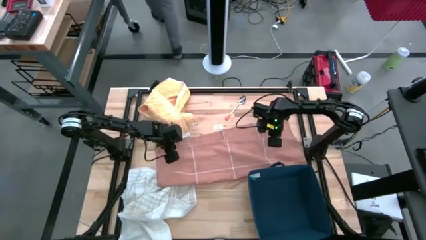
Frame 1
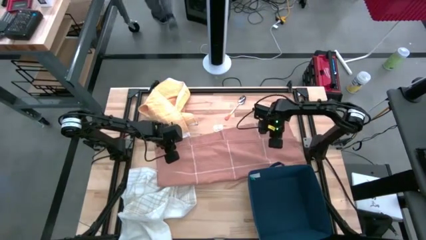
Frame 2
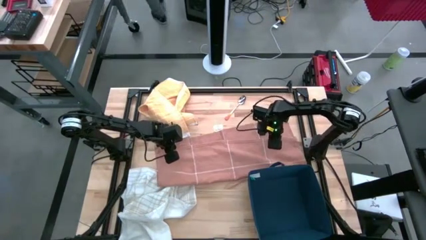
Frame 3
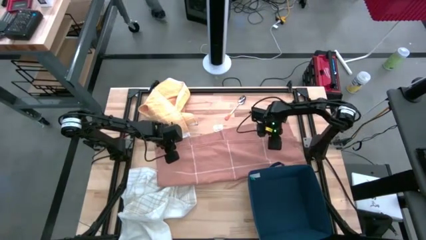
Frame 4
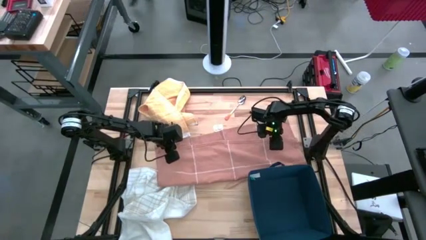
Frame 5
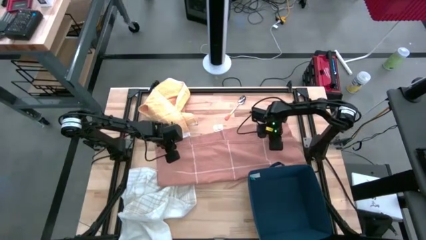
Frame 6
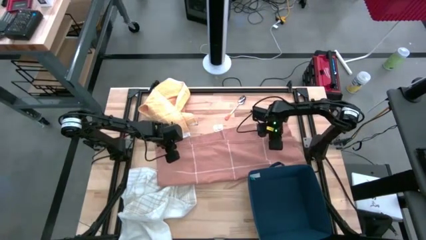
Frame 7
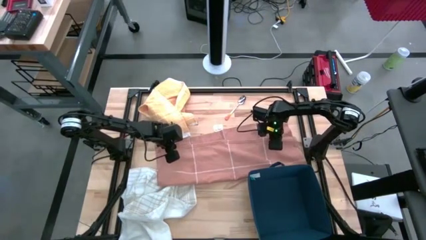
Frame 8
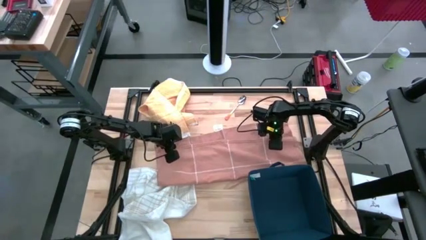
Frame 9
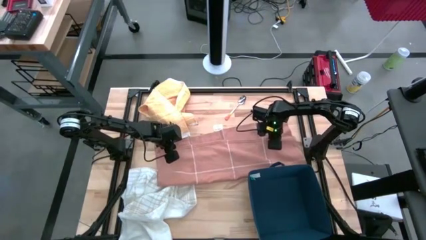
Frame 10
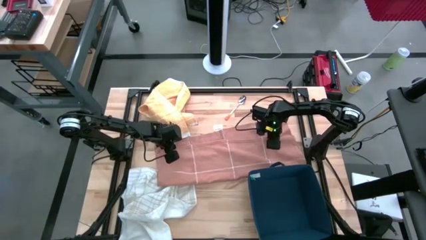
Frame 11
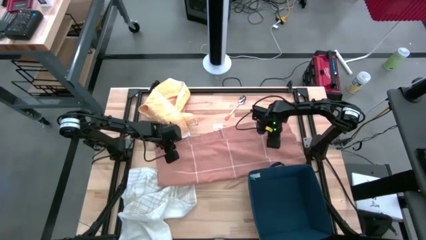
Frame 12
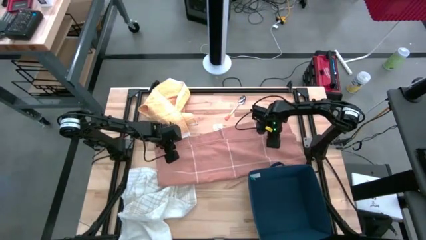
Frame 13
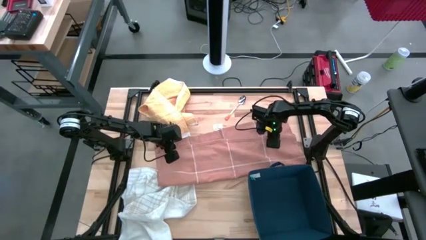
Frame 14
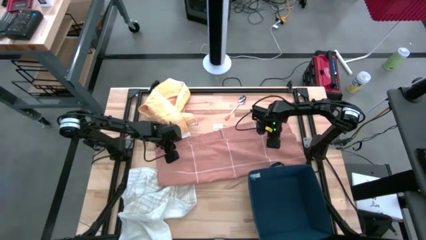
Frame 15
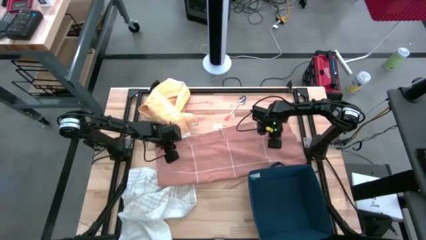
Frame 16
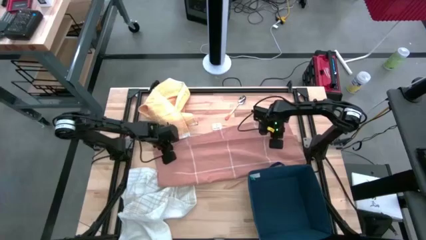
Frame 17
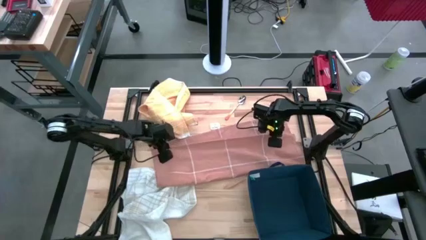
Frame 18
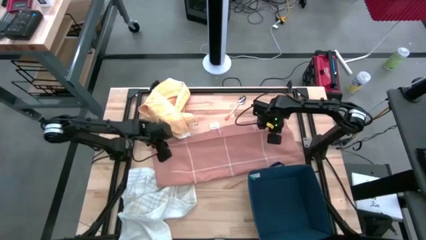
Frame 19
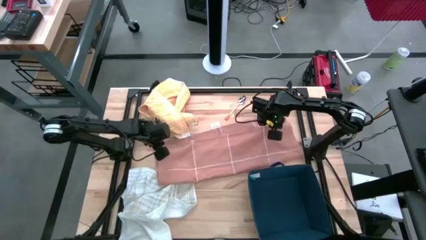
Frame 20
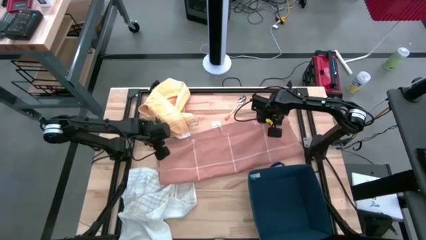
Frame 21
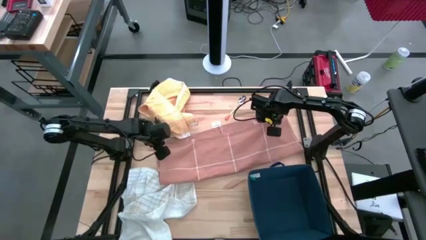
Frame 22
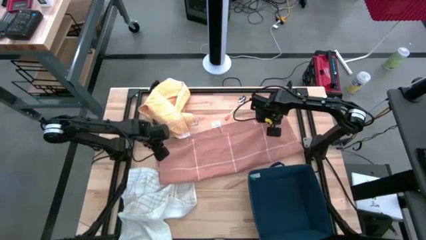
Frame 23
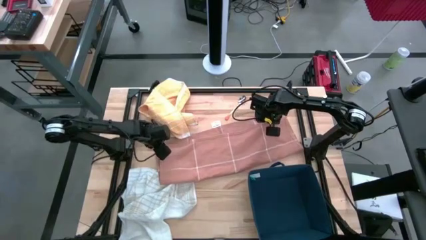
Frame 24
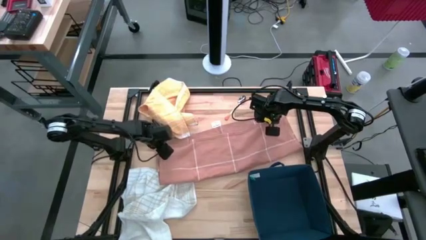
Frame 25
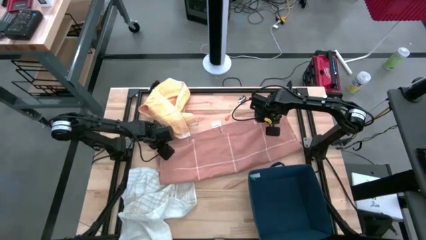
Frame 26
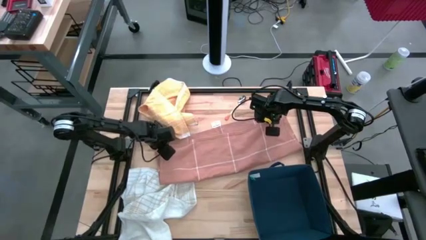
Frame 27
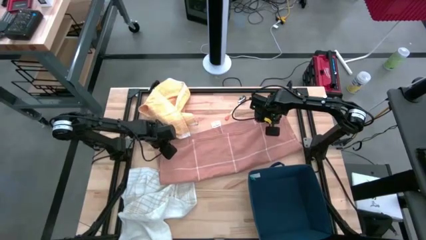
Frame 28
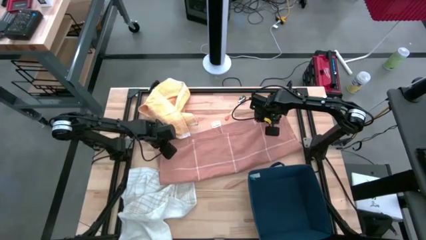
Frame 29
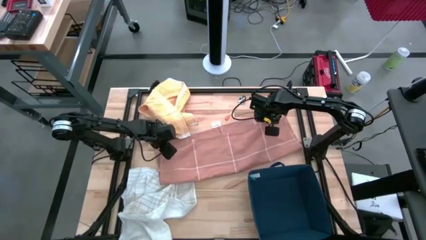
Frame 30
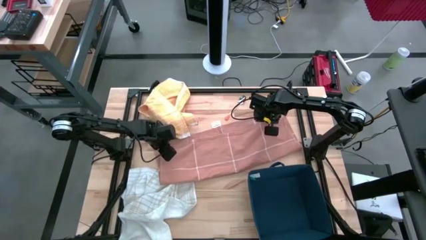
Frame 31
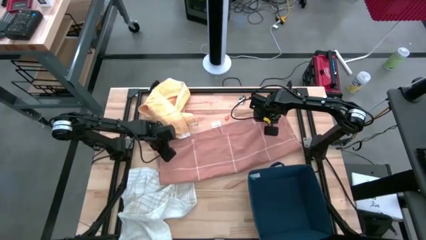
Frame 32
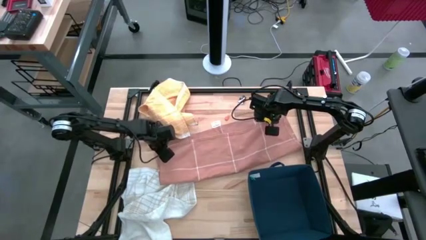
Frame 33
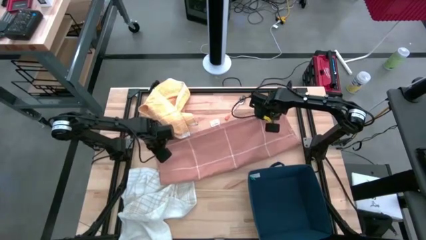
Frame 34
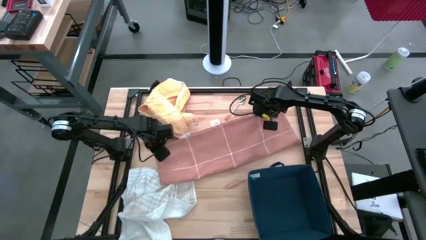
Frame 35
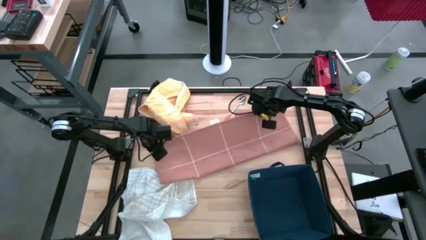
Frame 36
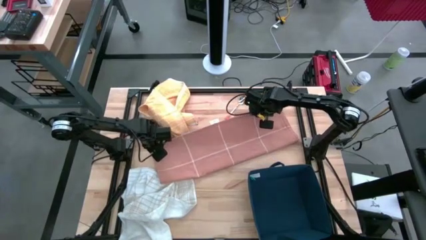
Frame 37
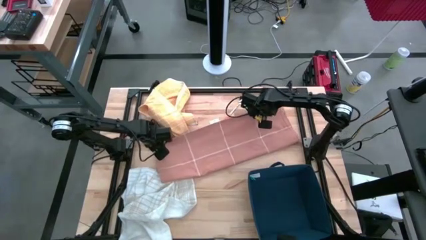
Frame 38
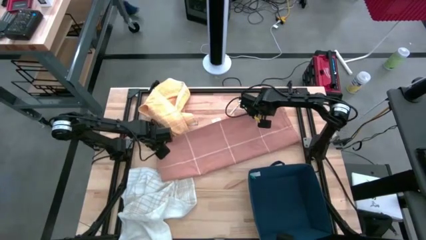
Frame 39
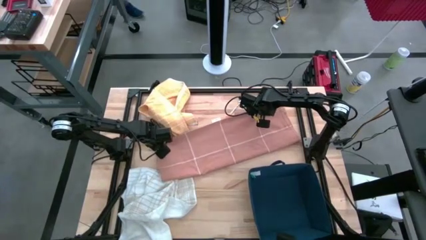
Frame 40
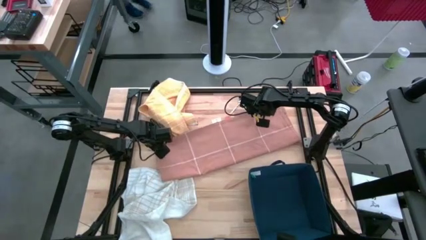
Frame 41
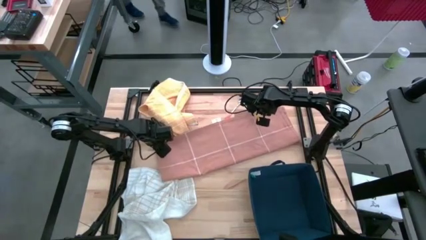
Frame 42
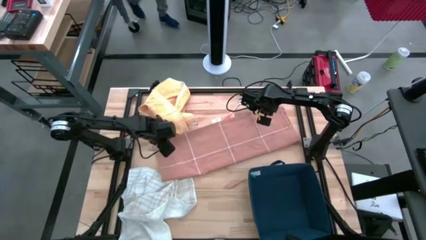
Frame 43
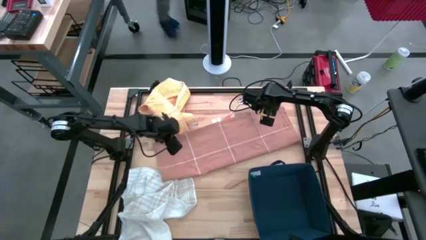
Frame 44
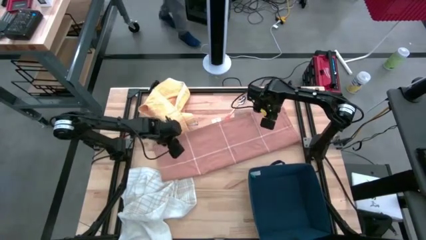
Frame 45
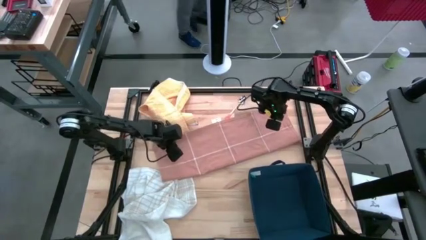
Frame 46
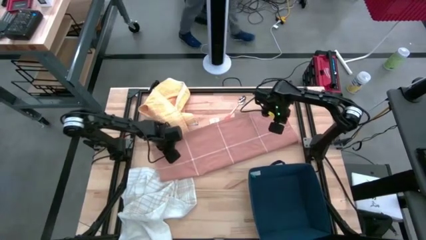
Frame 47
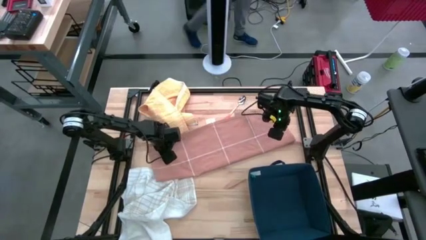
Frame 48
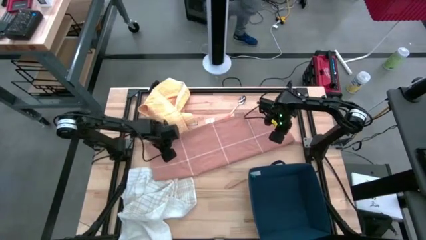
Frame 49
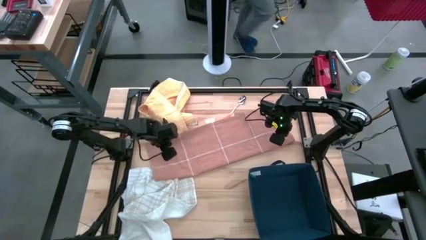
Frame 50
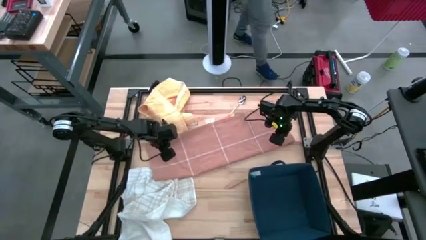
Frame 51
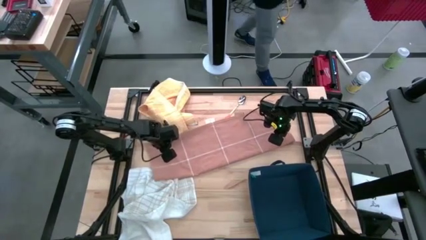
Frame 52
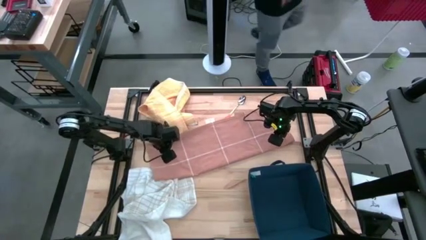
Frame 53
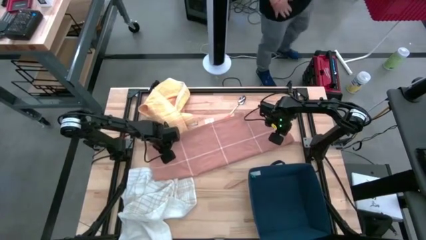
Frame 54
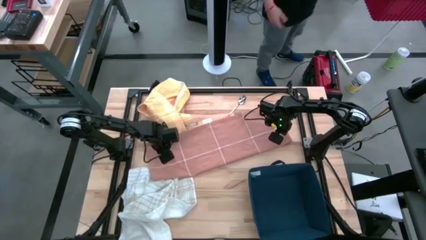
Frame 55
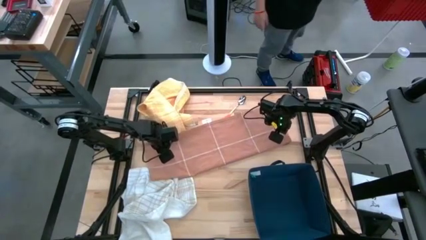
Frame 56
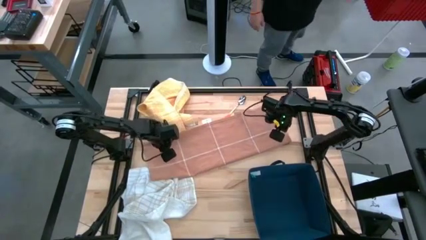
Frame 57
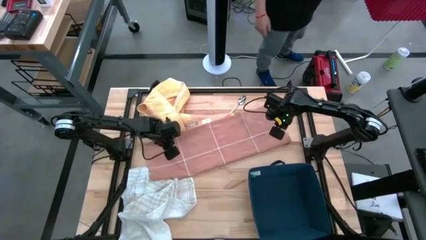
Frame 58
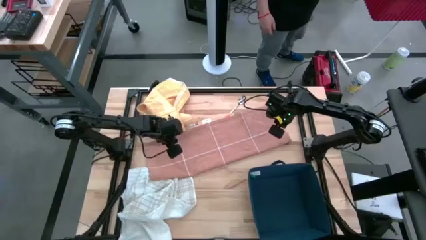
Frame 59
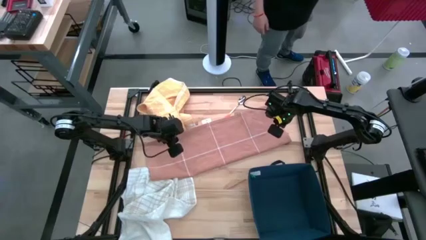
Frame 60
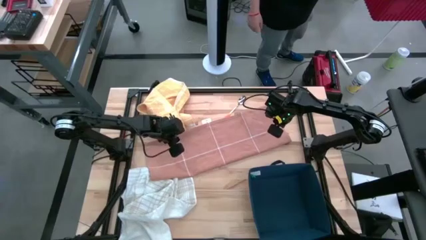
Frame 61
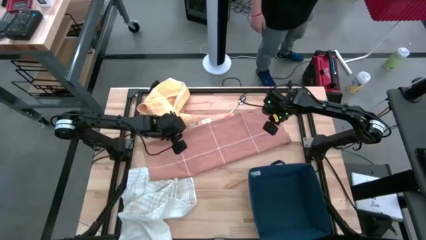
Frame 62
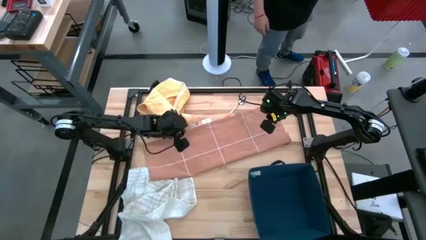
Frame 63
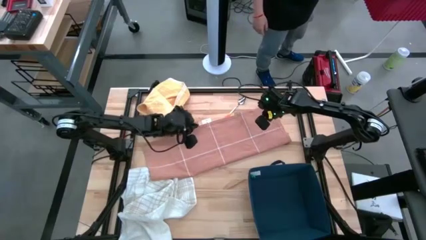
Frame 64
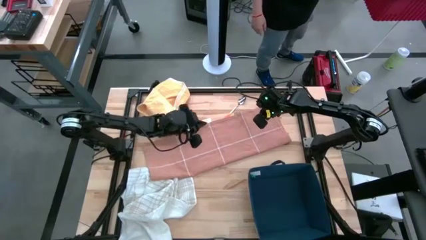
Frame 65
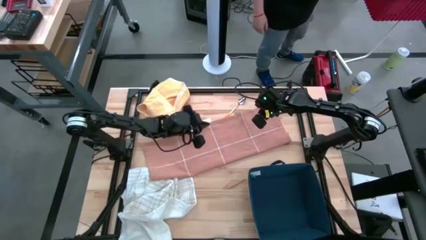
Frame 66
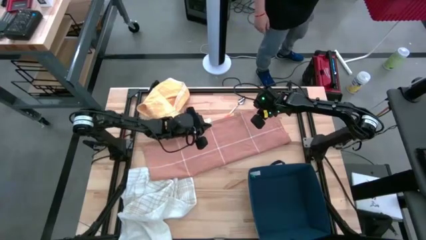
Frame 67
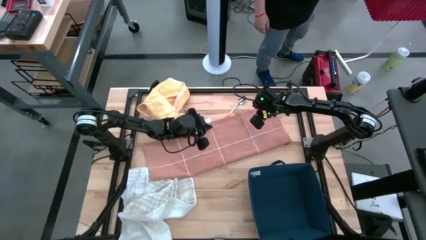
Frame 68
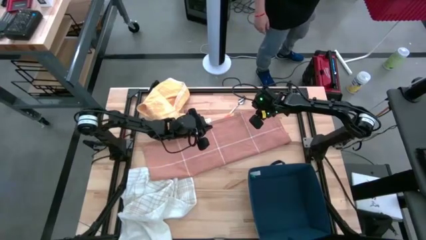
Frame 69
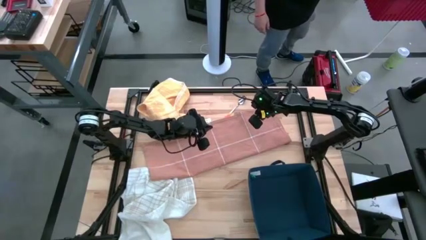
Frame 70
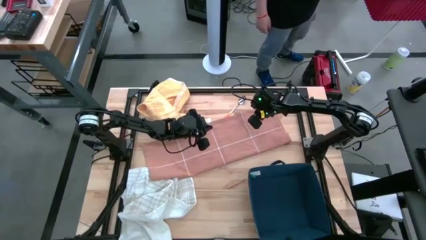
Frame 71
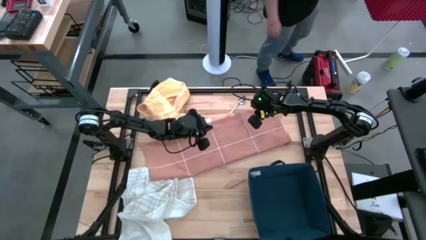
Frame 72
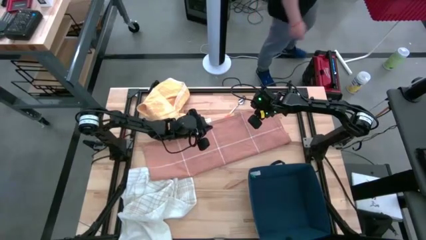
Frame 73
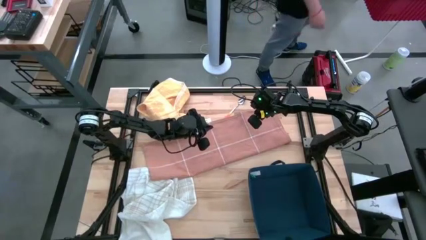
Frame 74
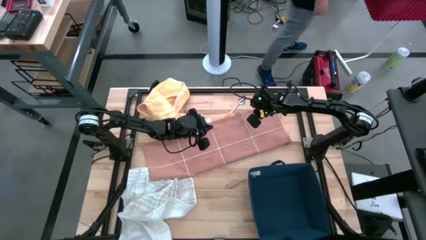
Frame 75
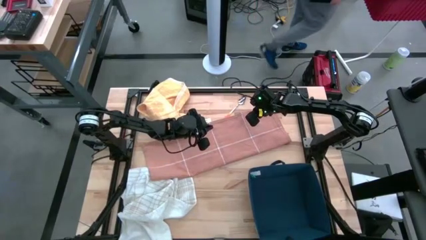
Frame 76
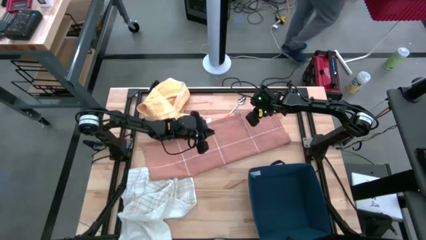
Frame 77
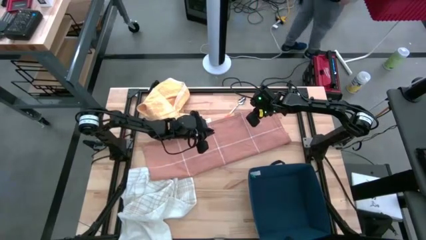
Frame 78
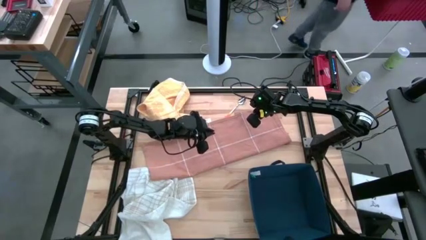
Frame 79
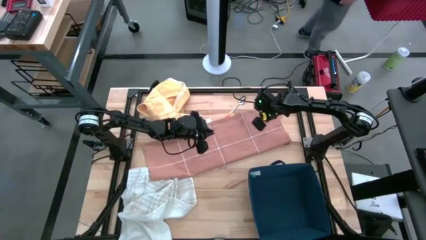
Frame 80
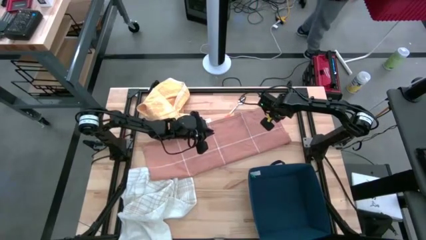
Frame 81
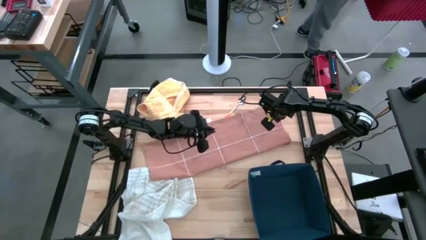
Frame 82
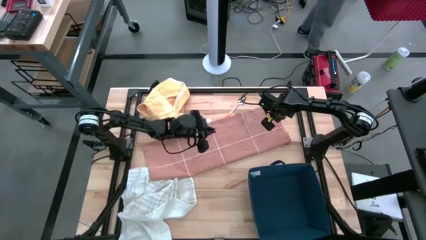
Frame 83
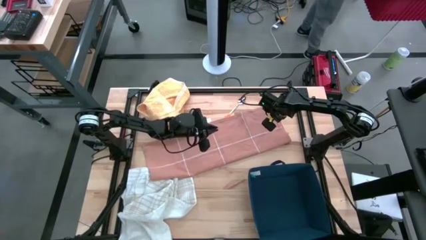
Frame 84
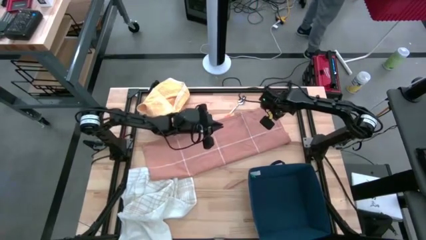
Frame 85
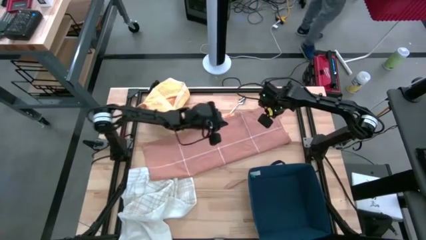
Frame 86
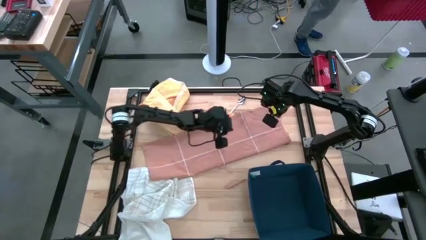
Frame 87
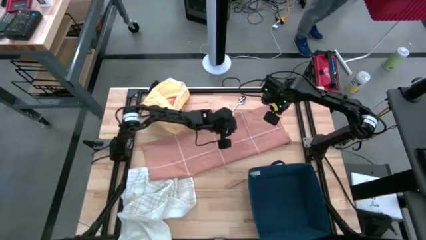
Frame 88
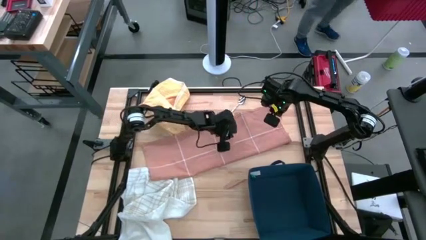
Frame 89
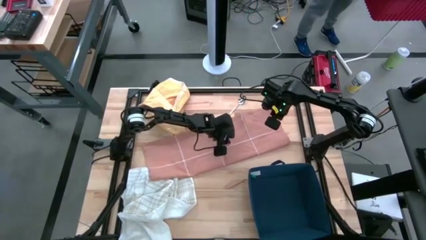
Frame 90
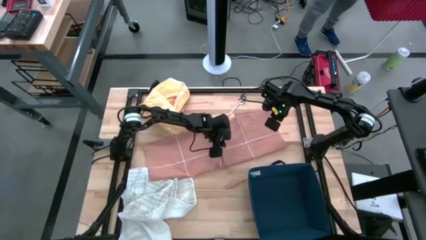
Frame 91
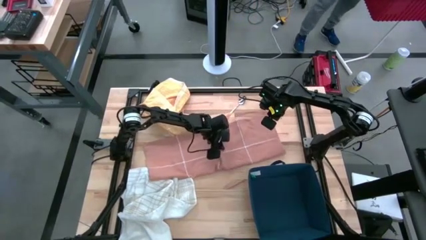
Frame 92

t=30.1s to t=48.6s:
Task: Fold towel
Fold the brown towel
